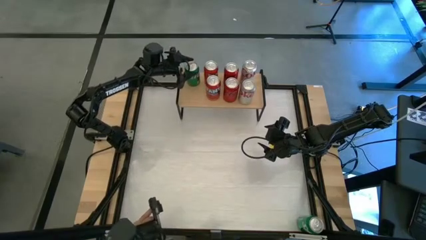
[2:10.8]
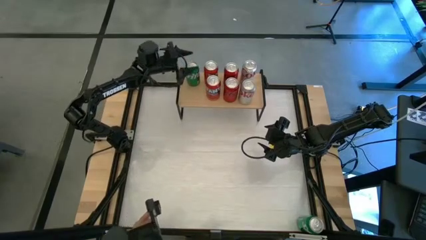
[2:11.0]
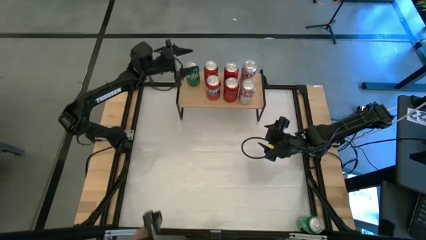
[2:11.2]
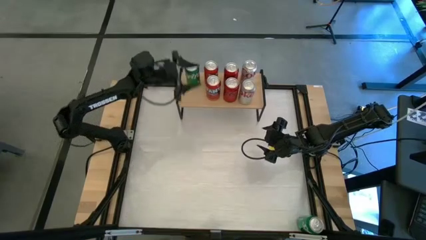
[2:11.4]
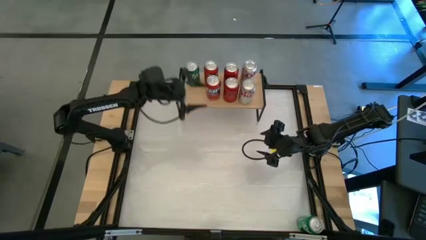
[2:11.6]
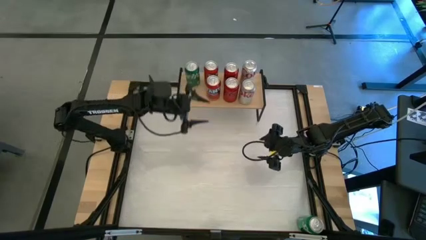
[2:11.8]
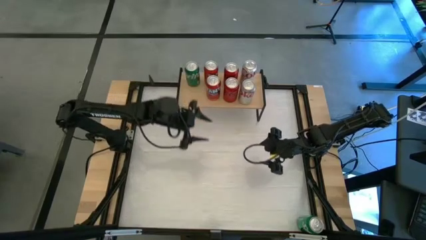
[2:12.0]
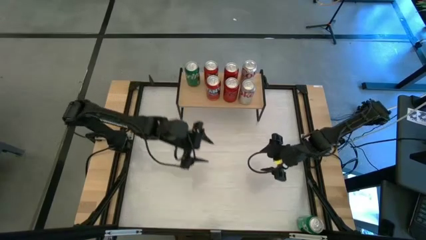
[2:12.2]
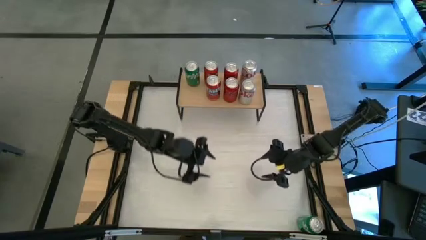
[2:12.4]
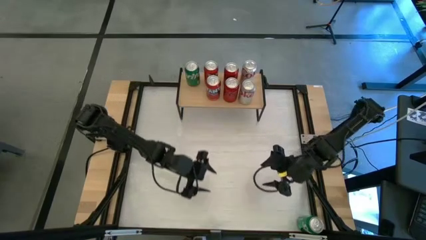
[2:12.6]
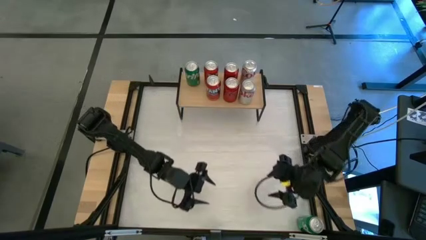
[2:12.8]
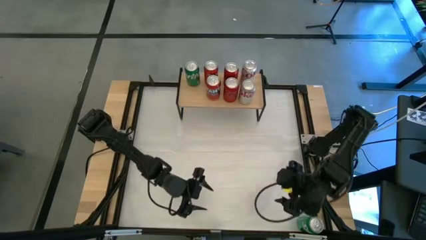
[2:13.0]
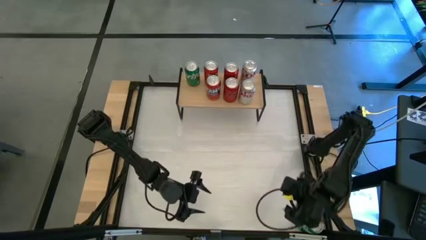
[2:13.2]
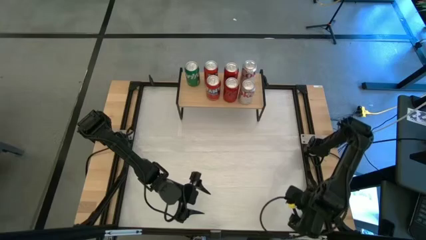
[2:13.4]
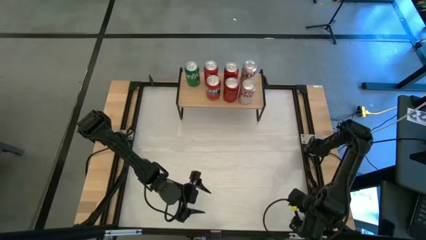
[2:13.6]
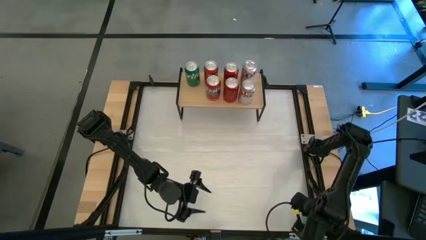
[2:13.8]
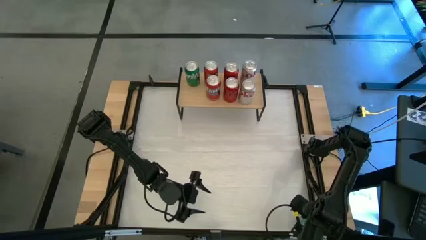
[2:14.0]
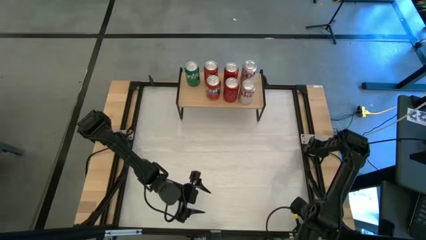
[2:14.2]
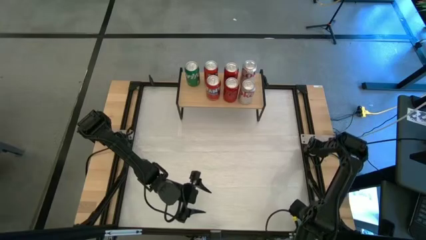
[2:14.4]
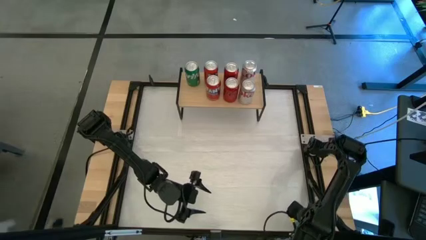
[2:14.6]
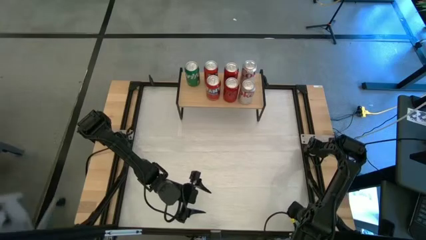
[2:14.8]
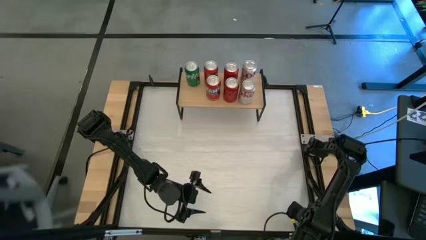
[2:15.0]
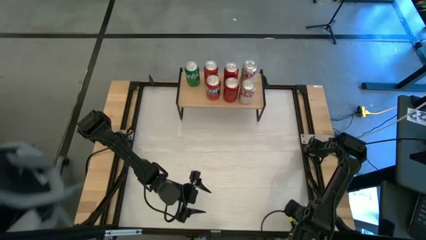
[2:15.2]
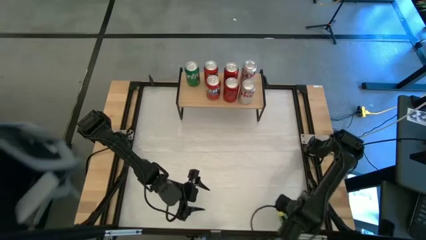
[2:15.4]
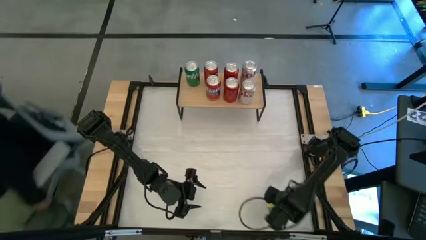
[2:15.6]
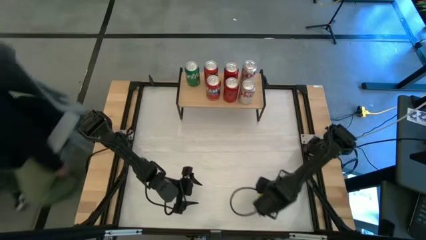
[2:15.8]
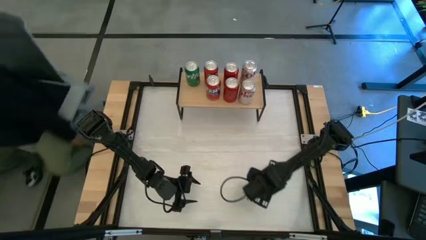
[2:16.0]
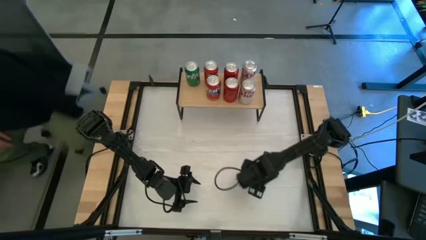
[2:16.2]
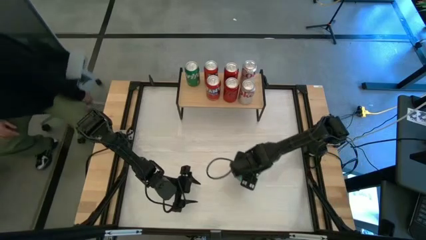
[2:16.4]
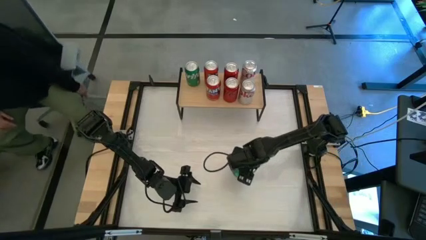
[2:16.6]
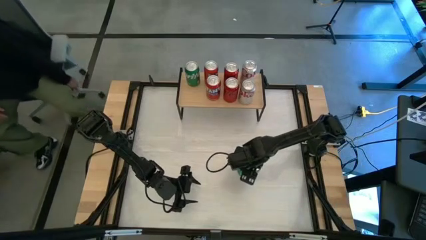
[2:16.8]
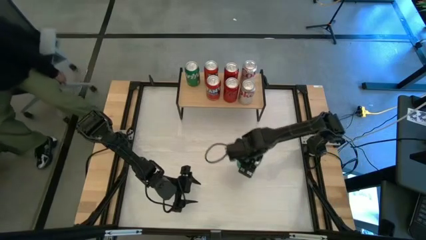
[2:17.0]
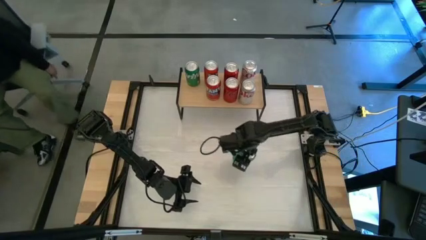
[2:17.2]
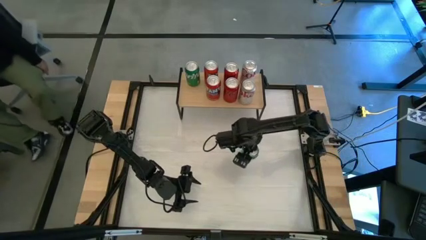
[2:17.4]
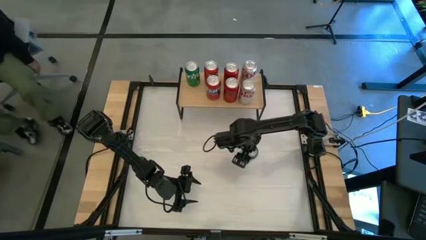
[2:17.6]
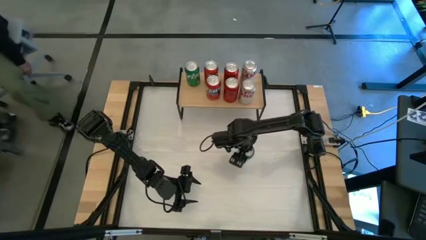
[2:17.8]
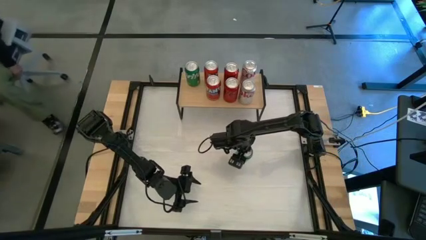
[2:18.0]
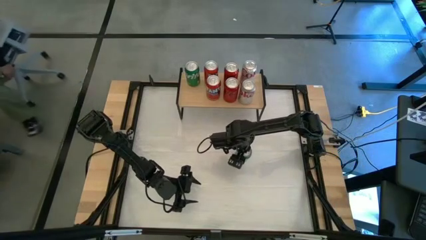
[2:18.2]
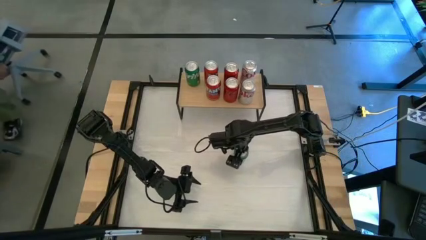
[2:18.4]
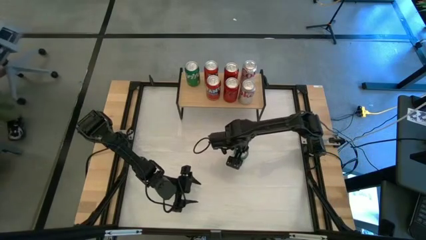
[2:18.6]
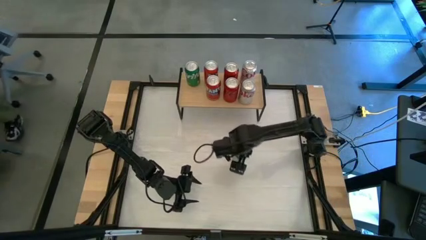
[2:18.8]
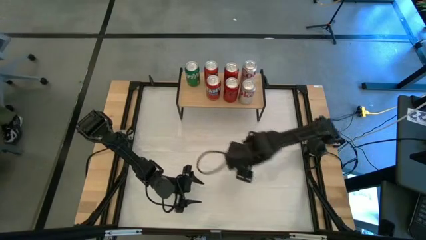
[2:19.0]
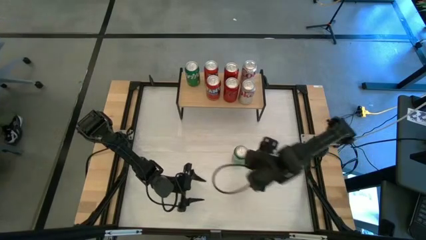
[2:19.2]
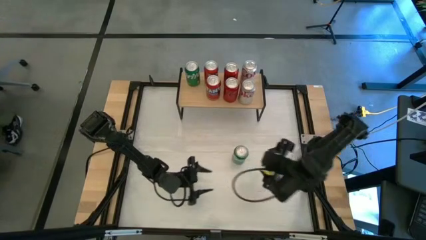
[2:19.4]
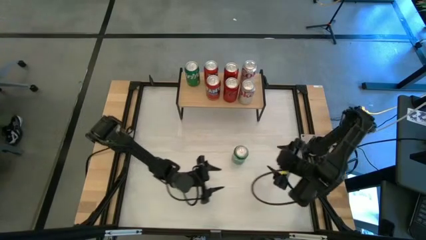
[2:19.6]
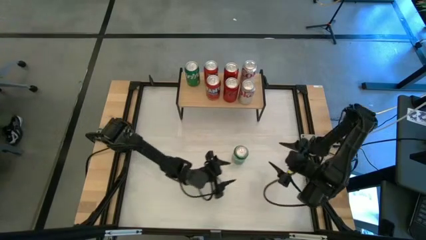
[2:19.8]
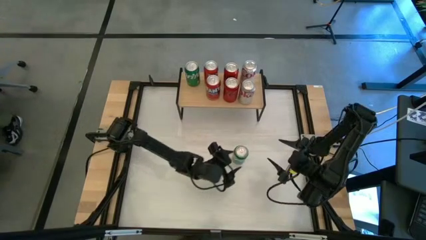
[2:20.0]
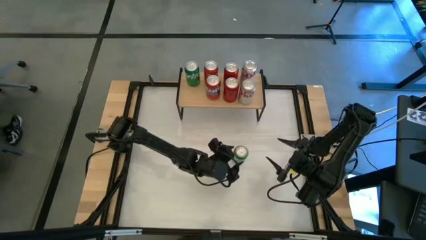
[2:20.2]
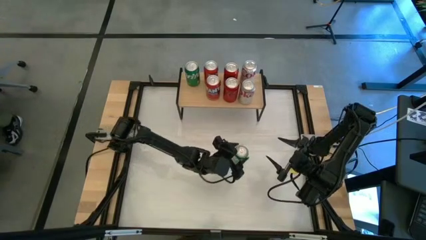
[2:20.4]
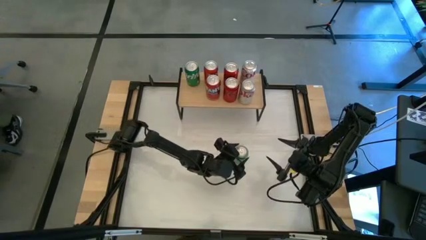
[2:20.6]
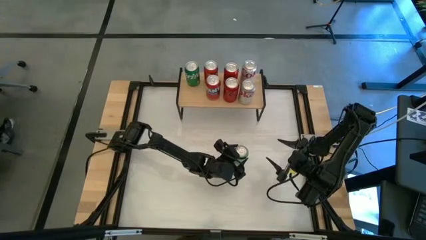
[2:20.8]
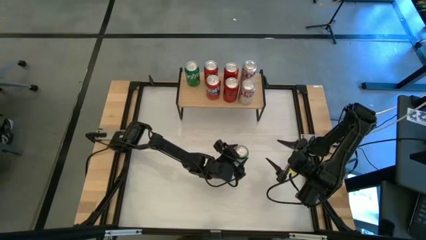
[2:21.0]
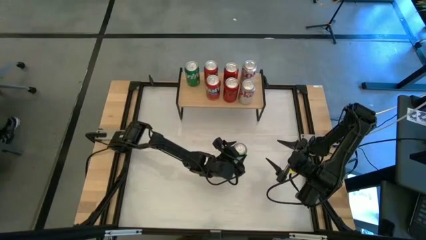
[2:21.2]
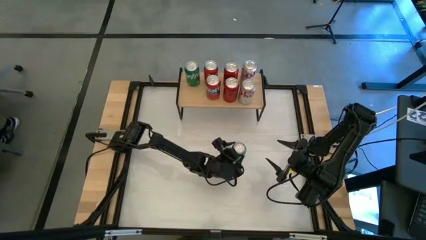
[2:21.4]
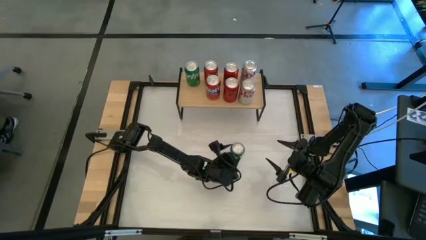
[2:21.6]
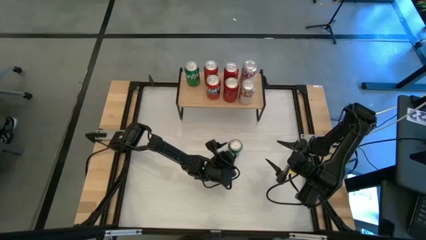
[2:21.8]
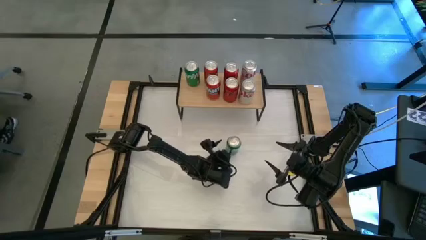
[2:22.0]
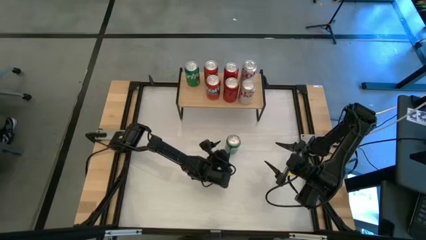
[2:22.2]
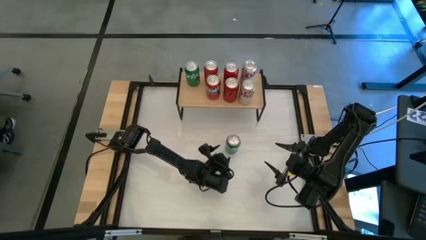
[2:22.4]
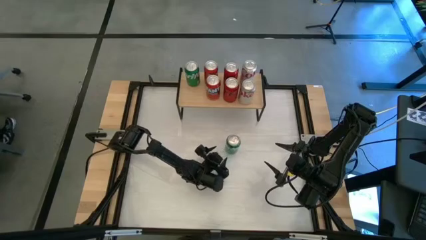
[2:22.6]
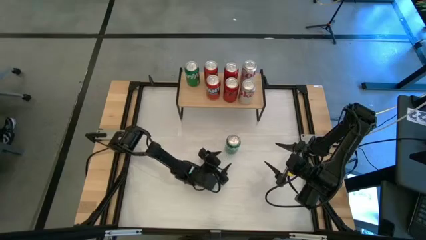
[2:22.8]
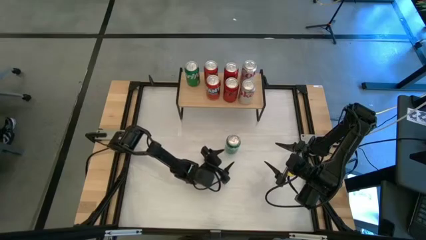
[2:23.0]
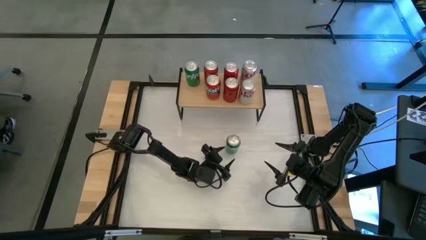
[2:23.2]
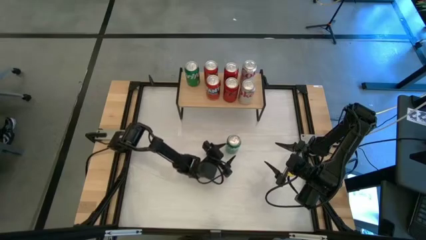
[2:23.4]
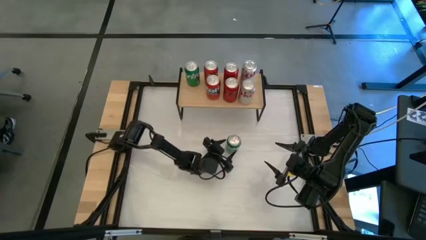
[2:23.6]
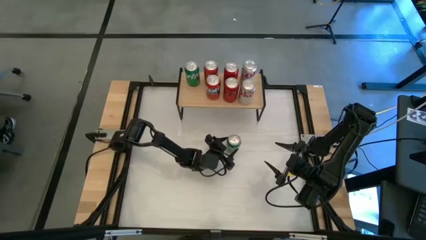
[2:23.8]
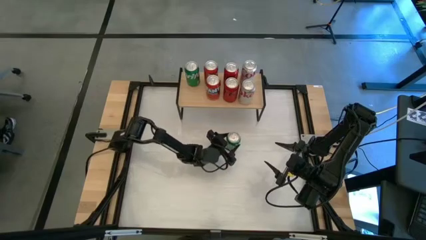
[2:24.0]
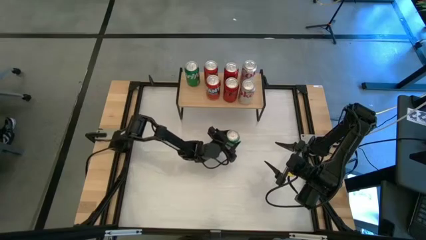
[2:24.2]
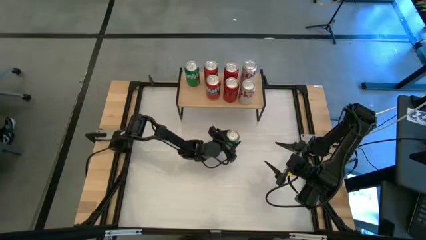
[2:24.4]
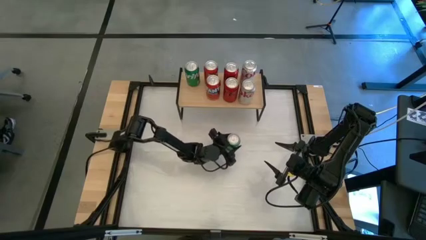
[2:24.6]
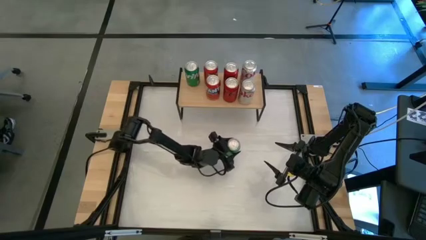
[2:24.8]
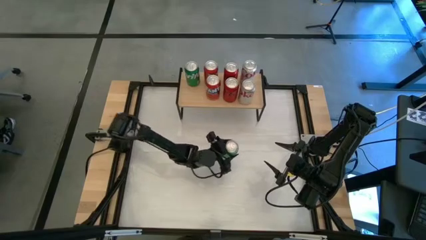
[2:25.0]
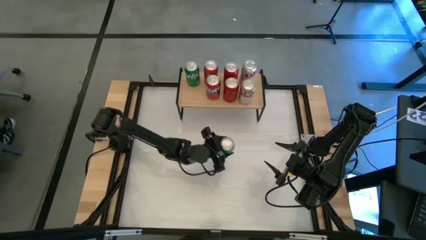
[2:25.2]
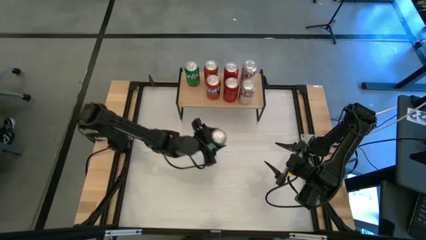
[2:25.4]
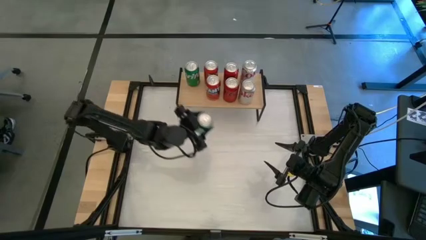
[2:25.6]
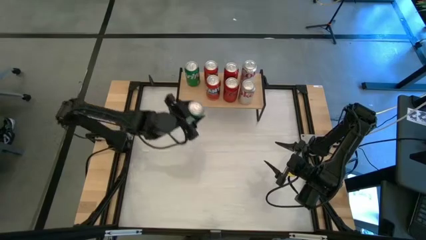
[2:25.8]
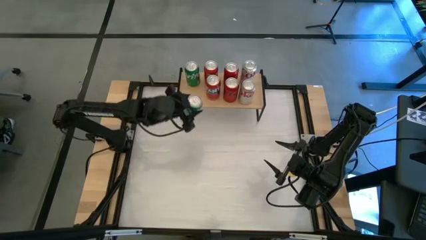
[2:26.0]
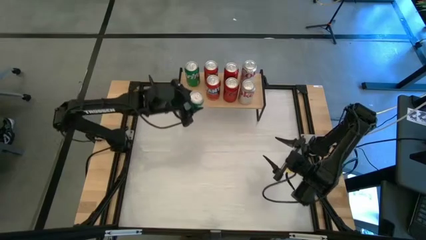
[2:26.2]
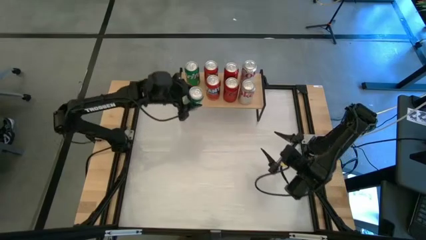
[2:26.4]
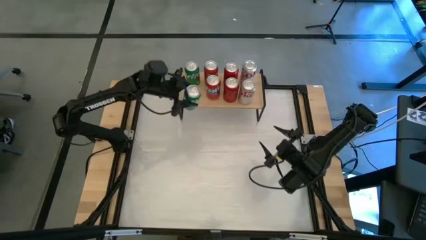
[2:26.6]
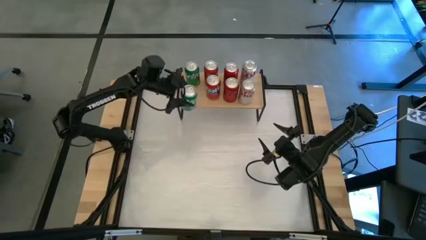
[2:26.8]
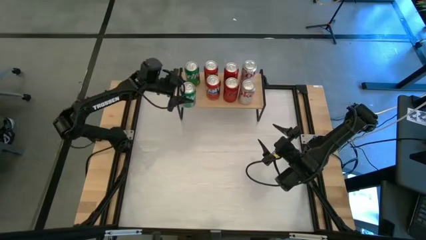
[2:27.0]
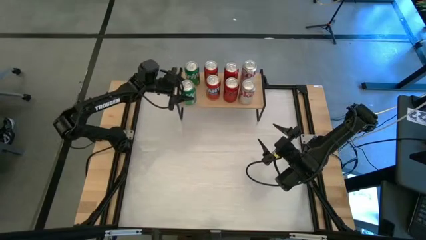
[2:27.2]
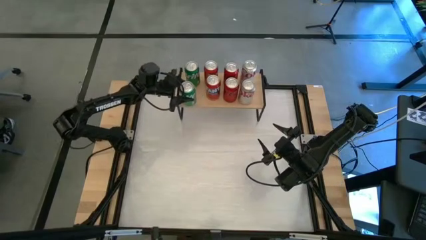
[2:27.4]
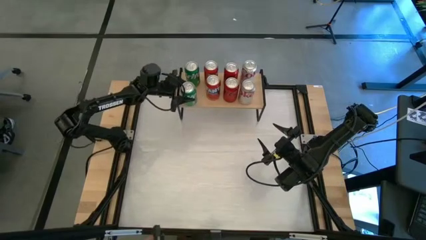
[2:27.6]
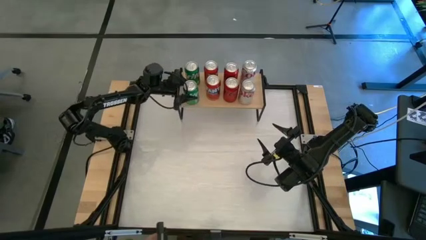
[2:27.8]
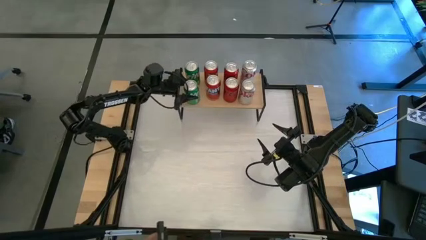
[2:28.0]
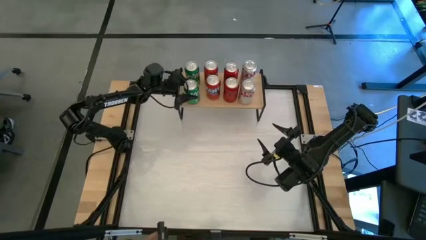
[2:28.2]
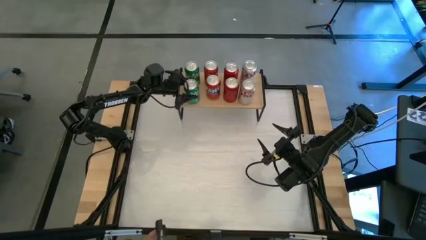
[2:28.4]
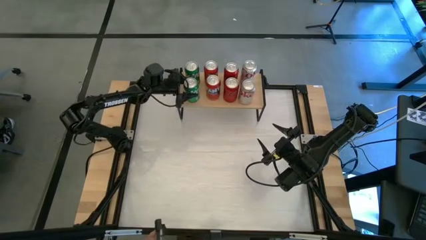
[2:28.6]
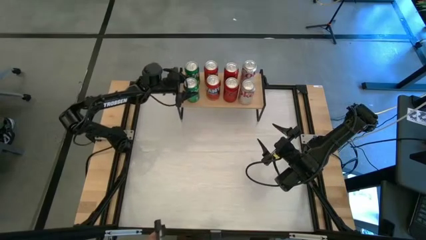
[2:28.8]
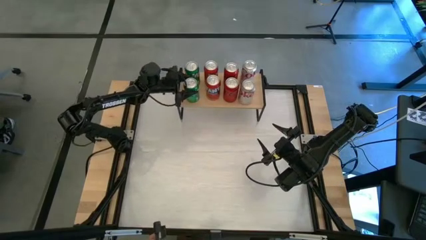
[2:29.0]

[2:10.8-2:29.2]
Task: Place canned beverage on shelf
Put the green soda can on the shelf
